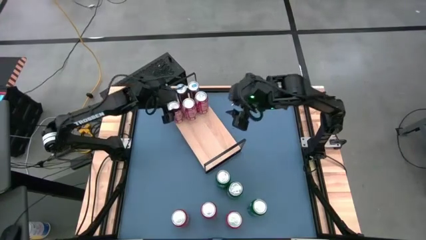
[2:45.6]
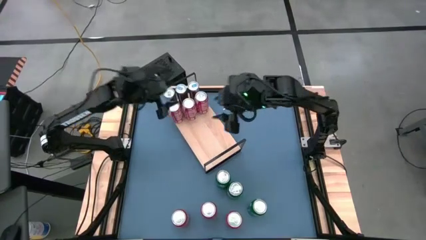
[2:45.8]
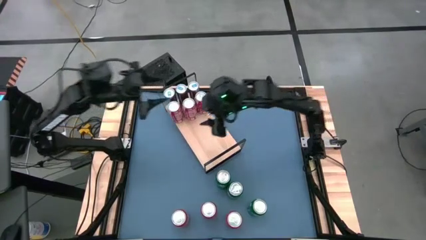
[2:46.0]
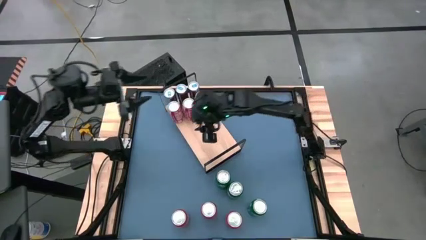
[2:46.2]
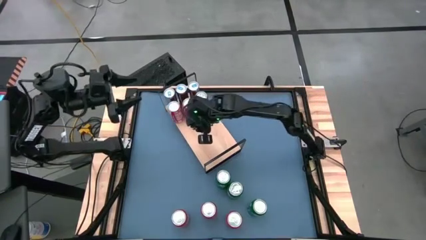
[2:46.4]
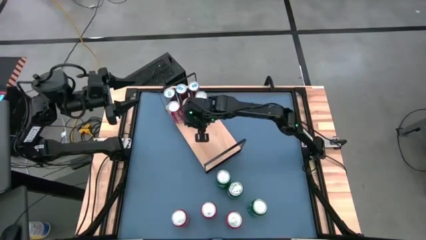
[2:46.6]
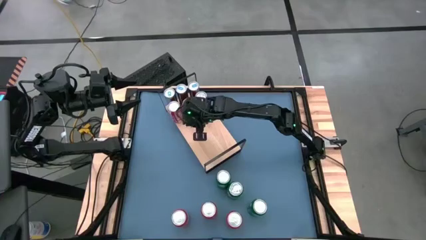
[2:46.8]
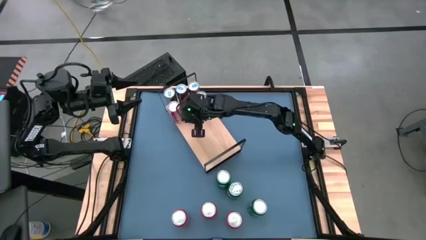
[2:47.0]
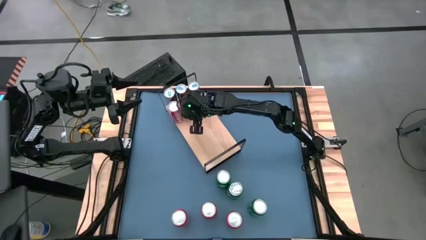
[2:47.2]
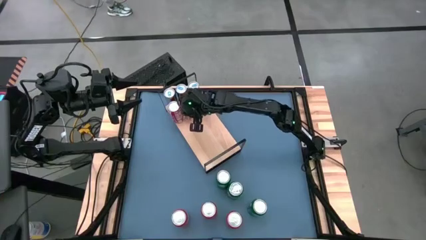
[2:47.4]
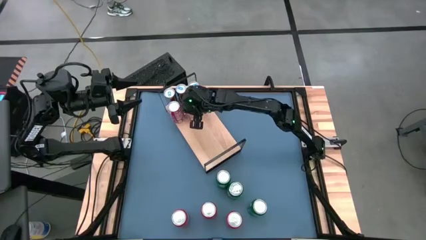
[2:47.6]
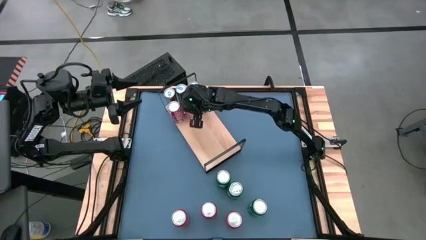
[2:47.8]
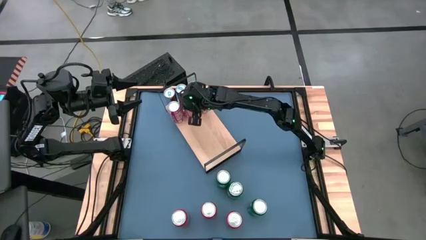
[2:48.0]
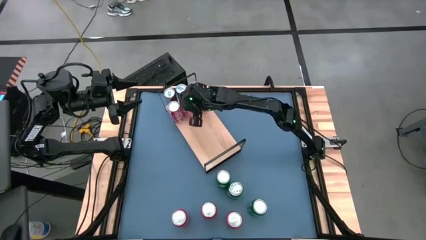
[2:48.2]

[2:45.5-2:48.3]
Task: Place canned beverage on shelf
Adjust the red white soda can on the shelf

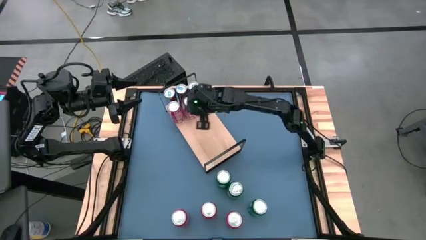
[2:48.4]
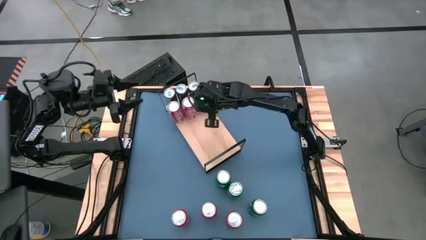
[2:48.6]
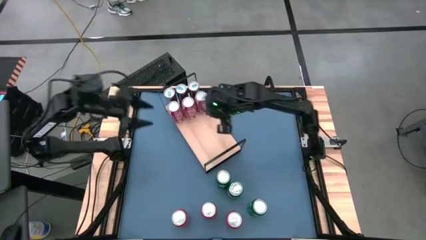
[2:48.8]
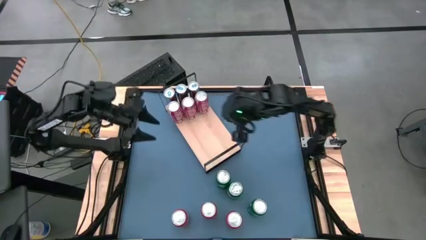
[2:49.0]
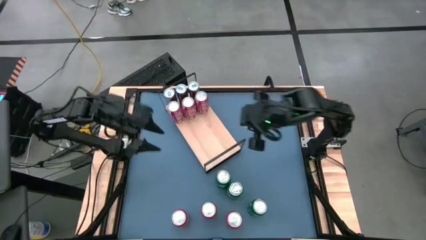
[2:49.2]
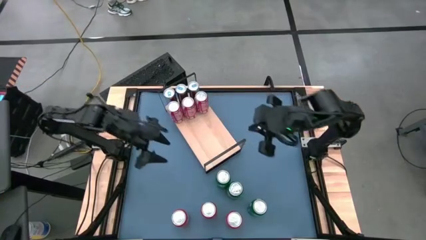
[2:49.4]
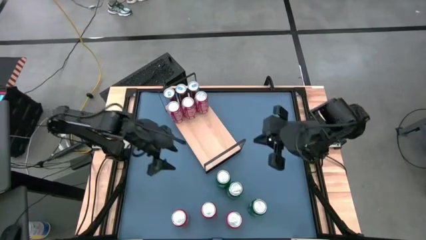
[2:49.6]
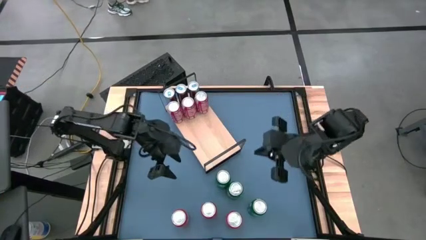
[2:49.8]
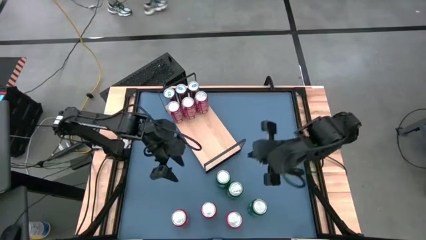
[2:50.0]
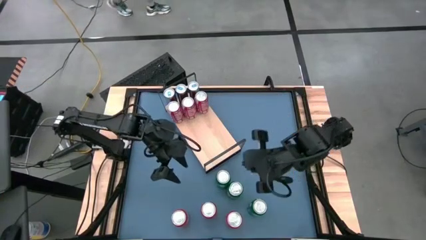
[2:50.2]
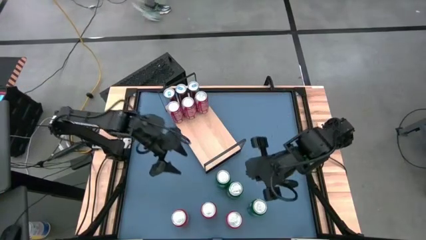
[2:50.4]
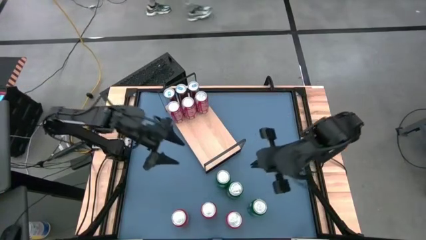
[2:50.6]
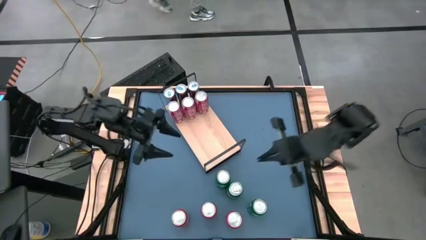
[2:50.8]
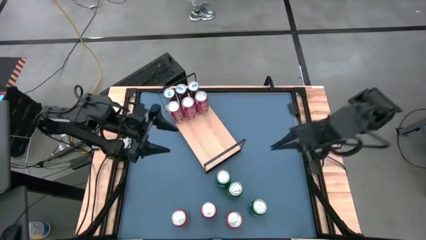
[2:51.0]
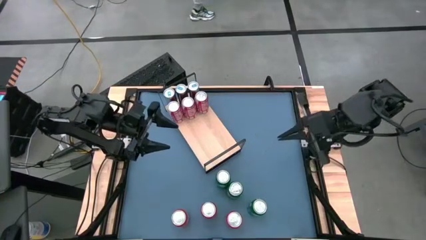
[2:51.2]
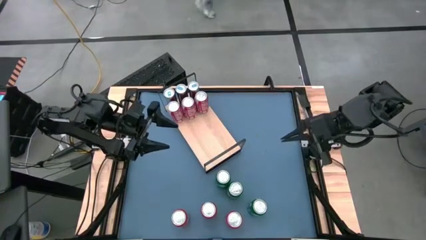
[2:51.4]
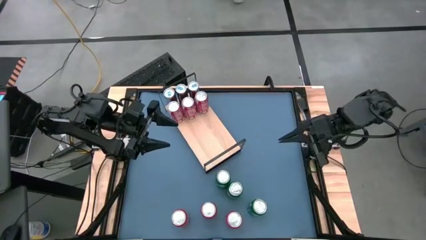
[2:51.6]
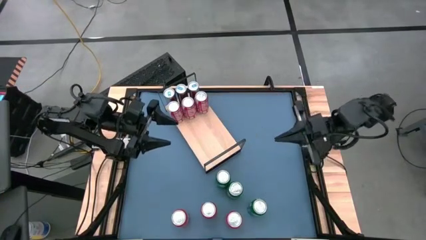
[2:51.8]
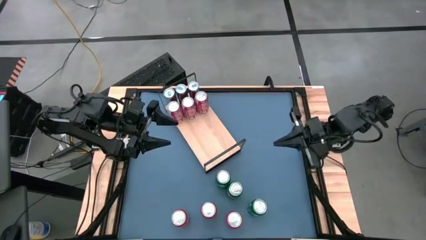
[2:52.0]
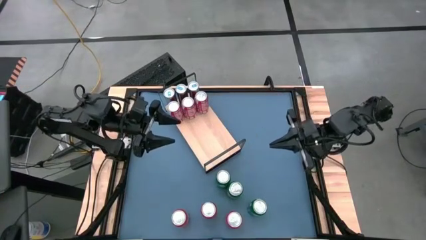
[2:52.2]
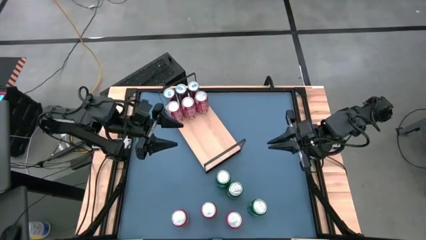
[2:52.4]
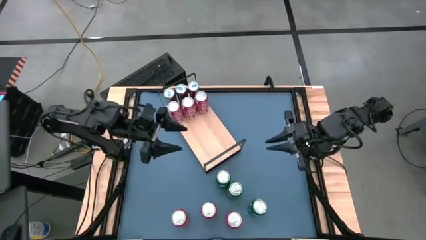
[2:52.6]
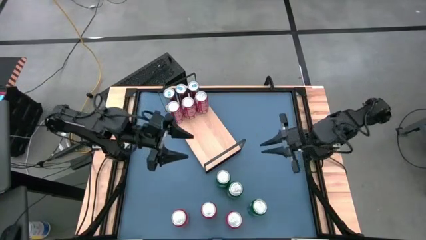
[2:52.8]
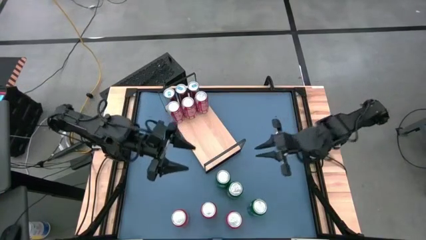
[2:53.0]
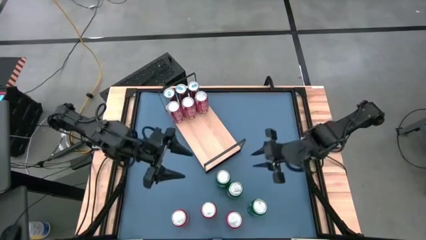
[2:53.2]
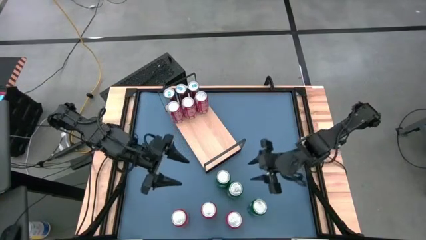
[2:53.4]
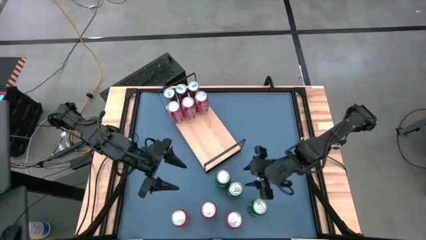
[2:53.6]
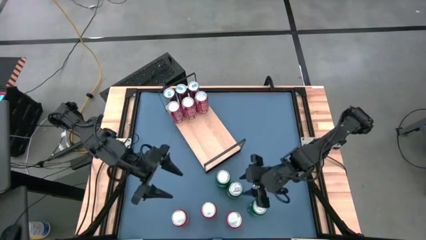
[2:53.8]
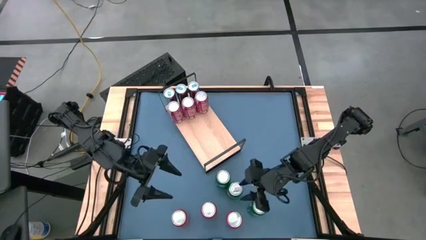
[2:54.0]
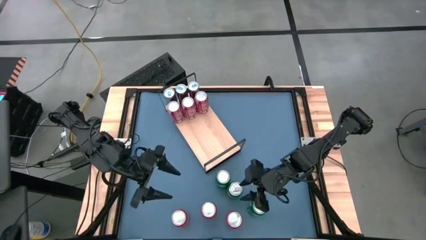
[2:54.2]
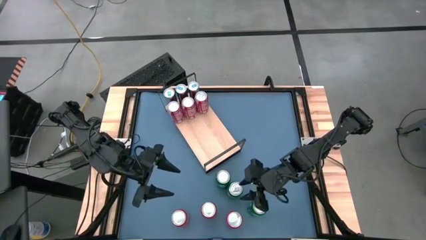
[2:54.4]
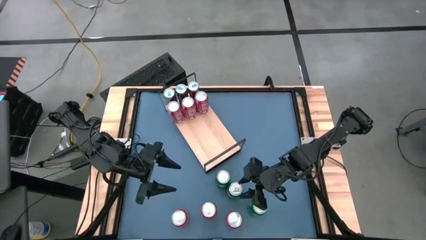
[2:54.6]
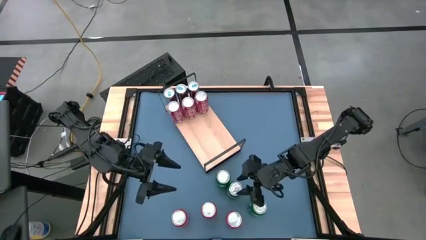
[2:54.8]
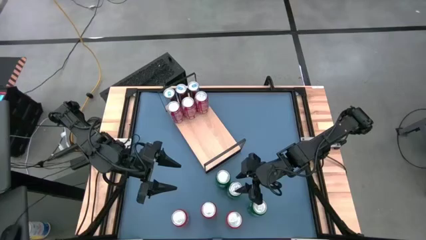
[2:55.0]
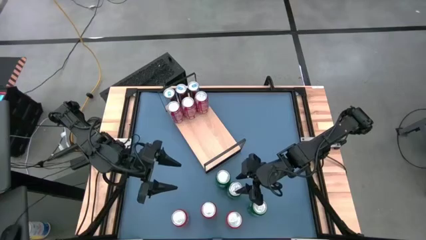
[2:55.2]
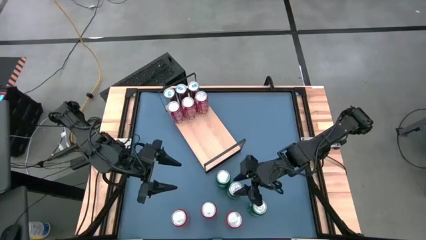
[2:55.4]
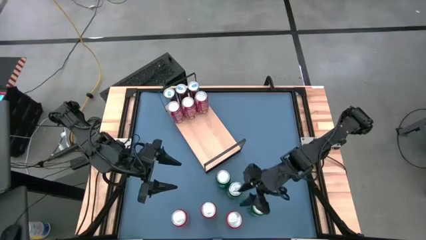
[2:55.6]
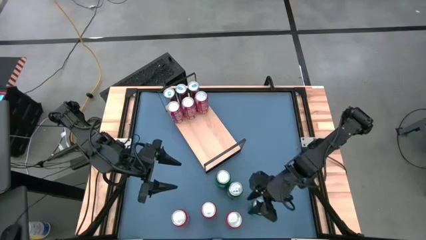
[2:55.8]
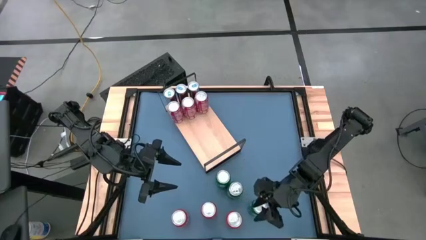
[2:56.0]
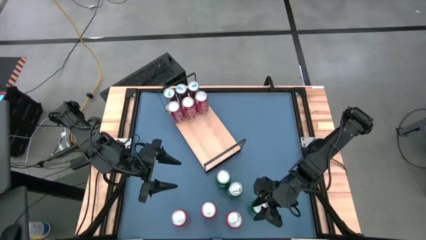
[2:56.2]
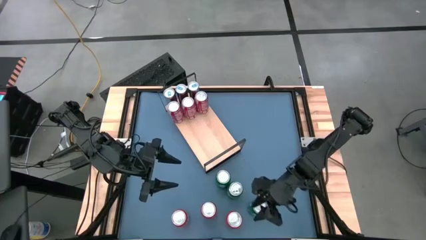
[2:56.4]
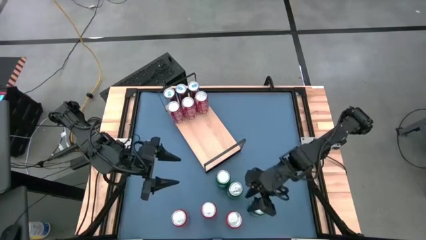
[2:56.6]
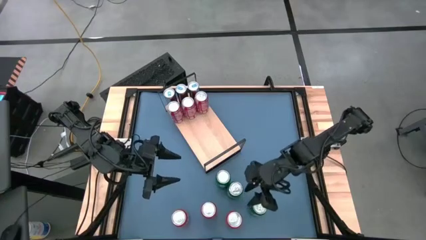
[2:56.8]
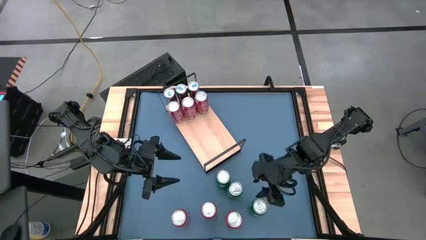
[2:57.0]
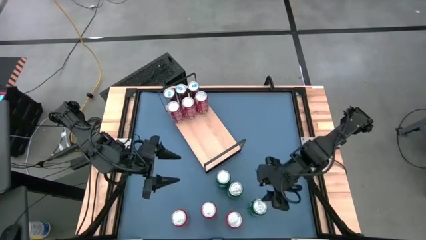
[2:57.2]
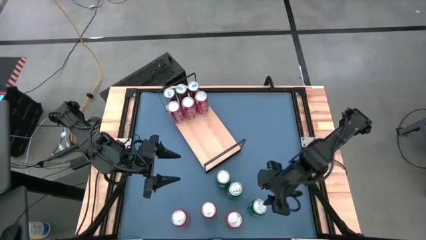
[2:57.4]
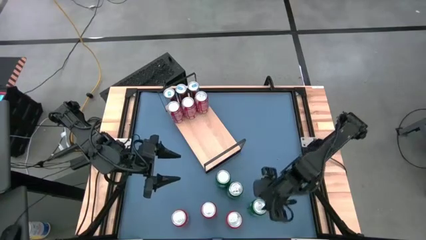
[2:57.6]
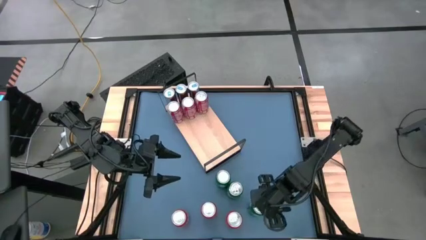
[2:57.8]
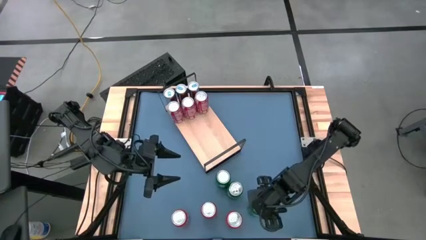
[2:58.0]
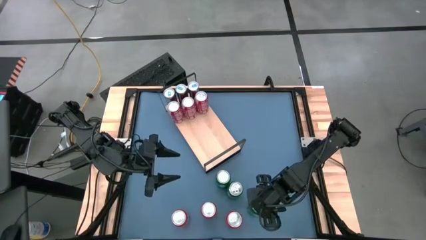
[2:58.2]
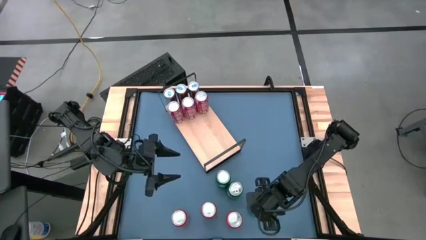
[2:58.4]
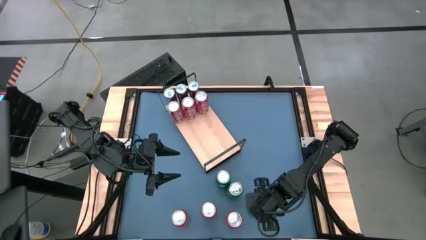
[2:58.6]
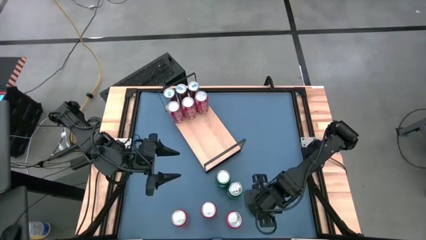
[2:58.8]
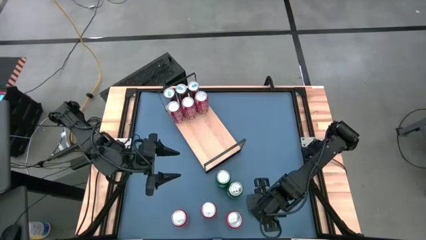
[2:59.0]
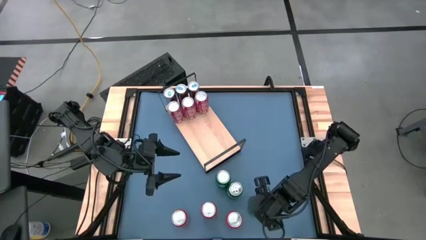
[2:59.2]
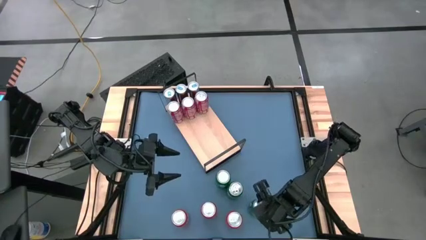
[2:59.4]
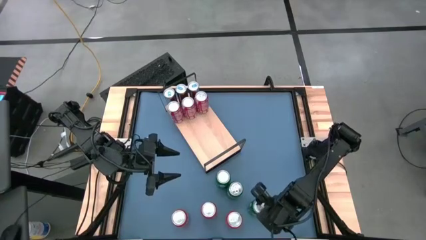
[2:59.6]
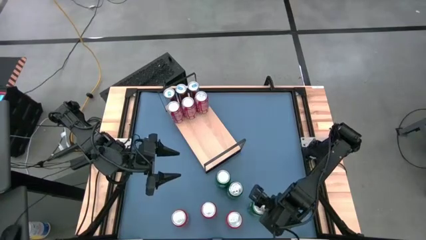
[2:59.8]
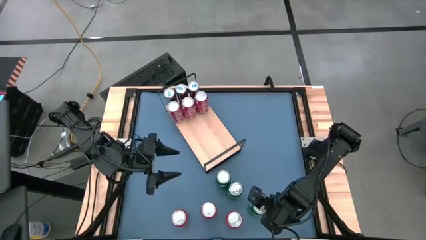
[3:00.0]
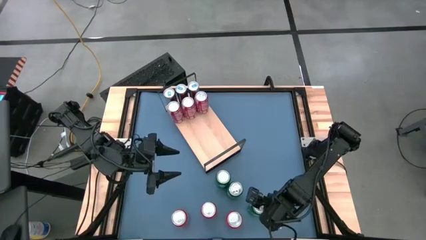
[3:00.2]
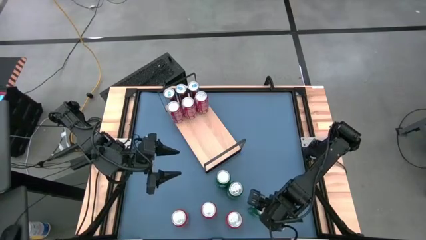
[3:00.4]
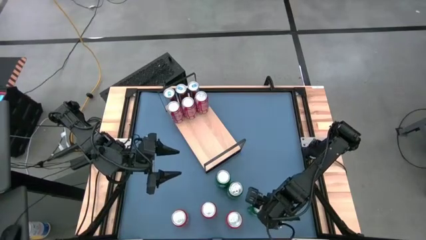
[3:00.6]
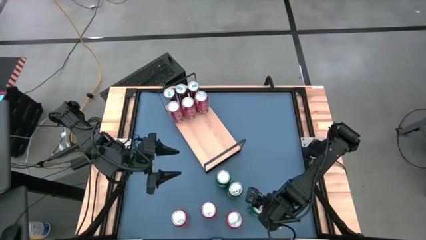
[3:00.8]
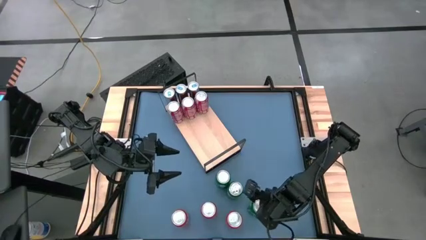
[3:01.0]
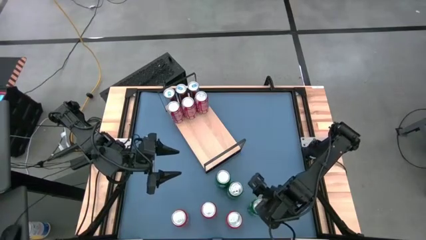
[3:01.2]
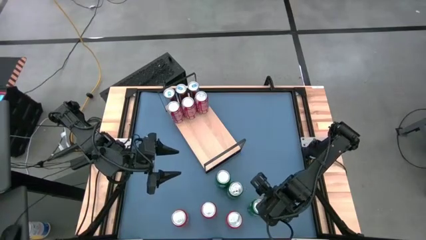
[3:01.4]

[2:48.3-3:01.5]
Put the bottom green soda can on the shelf
